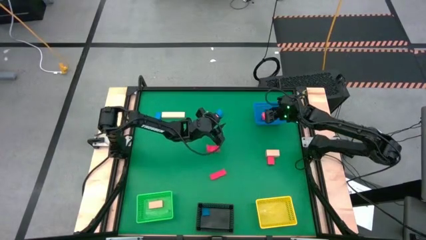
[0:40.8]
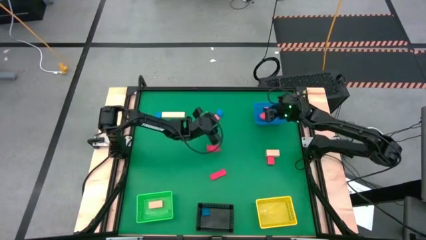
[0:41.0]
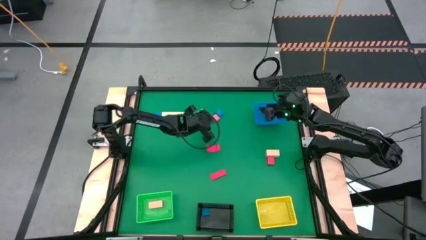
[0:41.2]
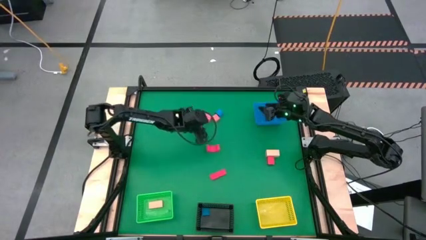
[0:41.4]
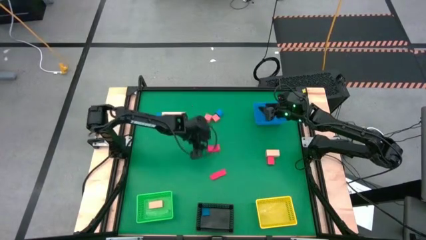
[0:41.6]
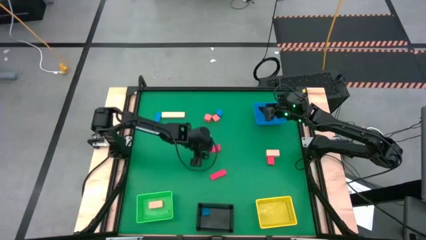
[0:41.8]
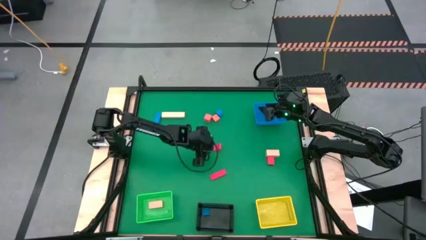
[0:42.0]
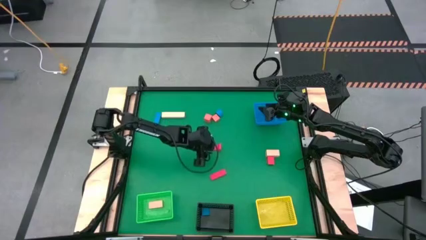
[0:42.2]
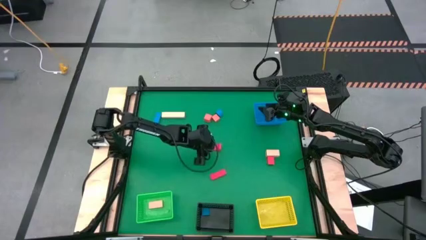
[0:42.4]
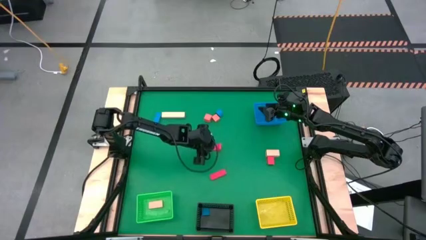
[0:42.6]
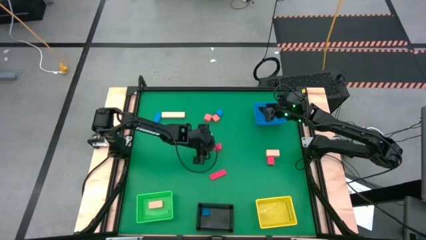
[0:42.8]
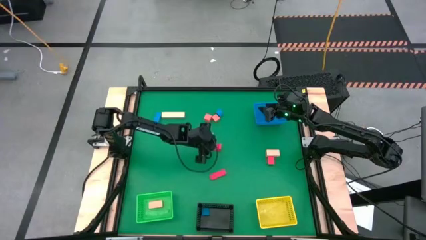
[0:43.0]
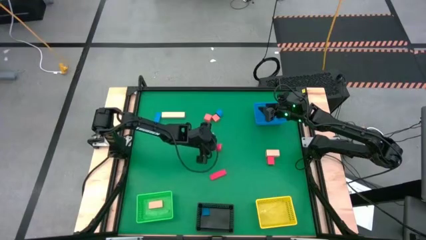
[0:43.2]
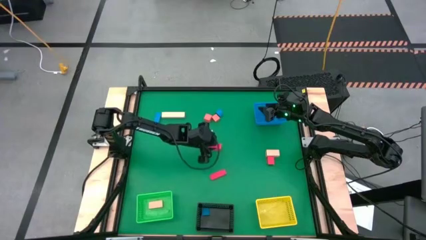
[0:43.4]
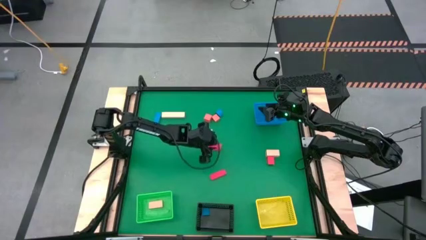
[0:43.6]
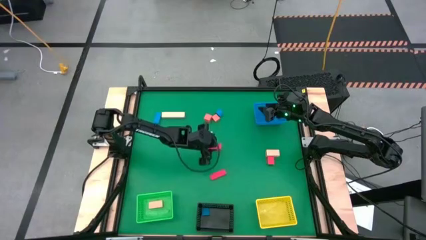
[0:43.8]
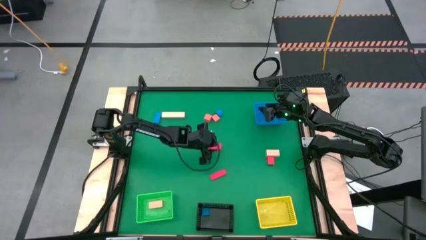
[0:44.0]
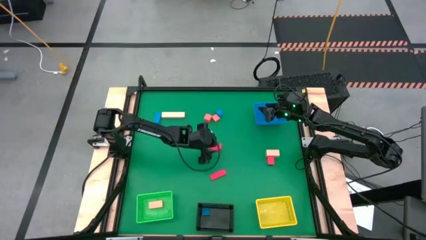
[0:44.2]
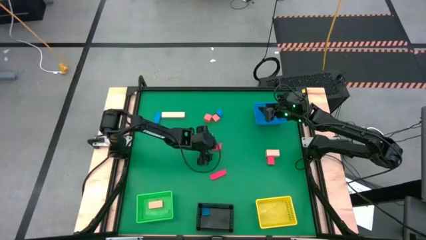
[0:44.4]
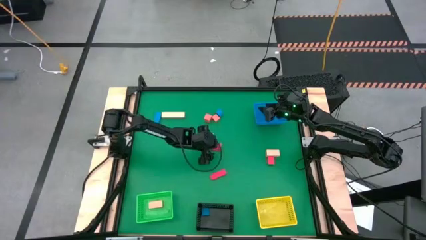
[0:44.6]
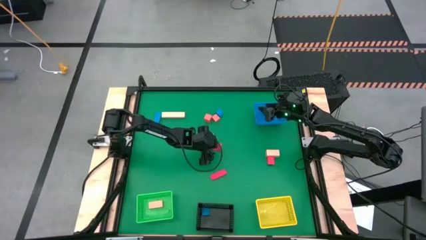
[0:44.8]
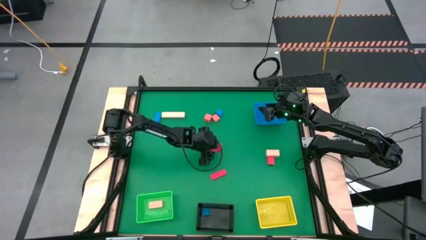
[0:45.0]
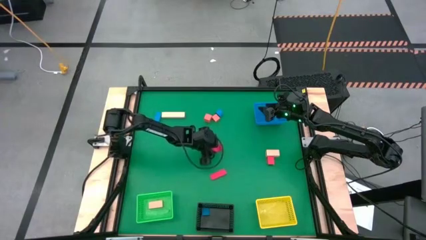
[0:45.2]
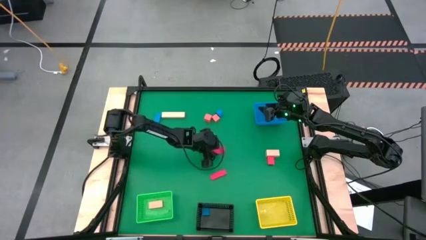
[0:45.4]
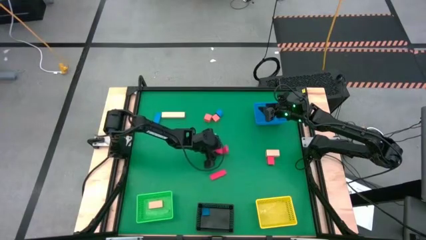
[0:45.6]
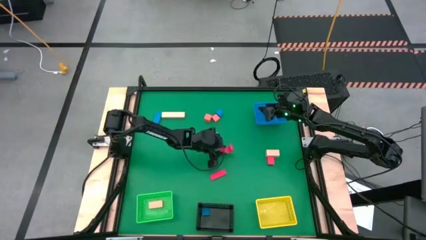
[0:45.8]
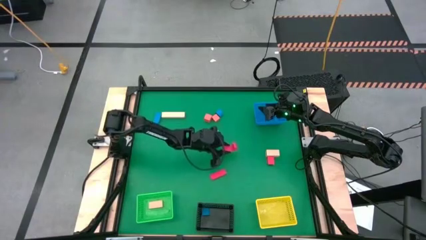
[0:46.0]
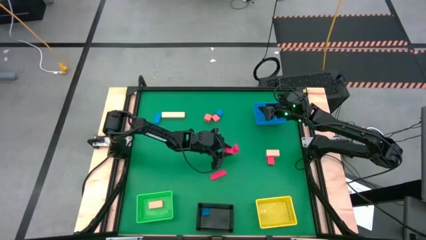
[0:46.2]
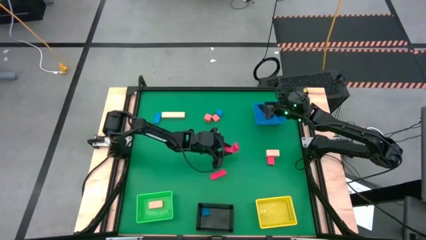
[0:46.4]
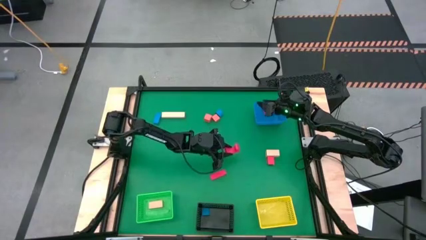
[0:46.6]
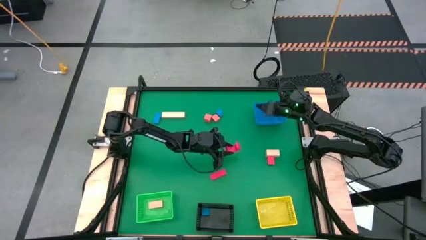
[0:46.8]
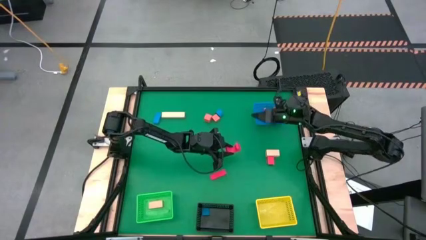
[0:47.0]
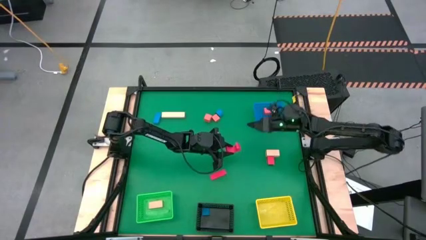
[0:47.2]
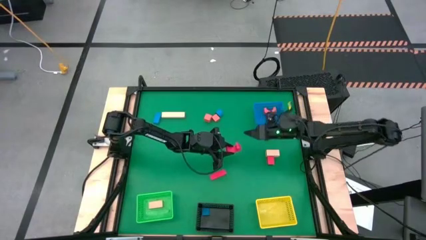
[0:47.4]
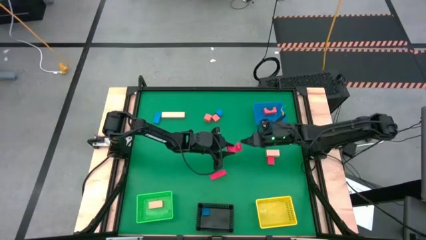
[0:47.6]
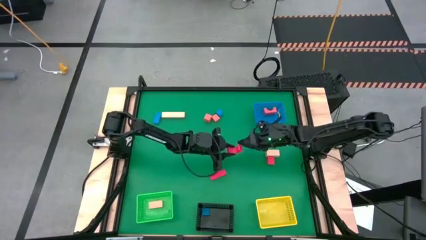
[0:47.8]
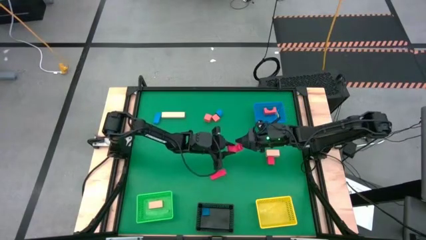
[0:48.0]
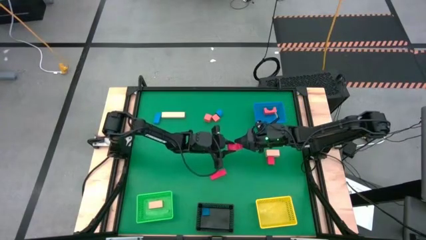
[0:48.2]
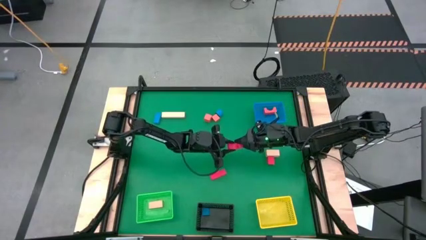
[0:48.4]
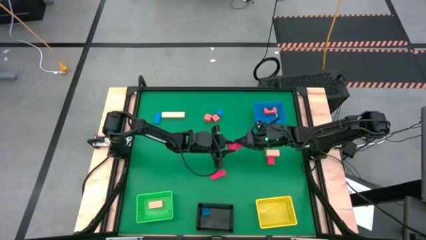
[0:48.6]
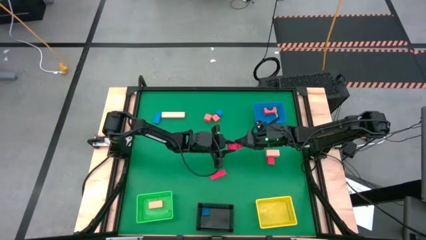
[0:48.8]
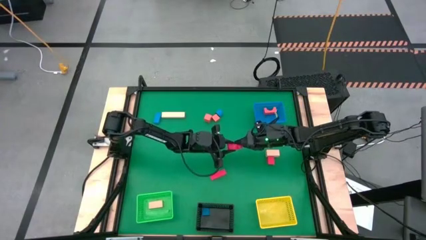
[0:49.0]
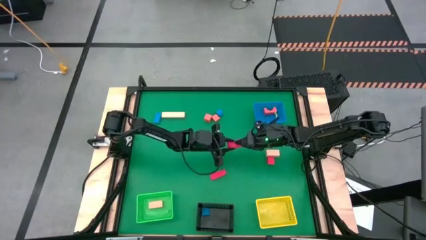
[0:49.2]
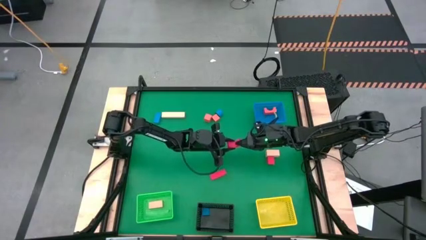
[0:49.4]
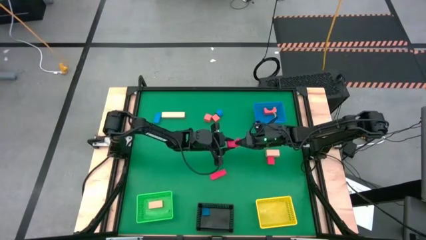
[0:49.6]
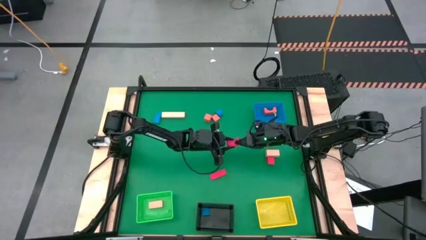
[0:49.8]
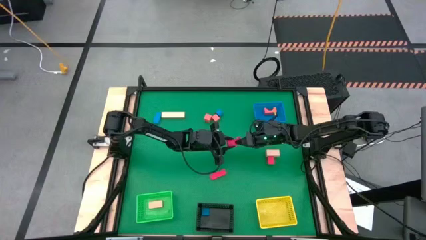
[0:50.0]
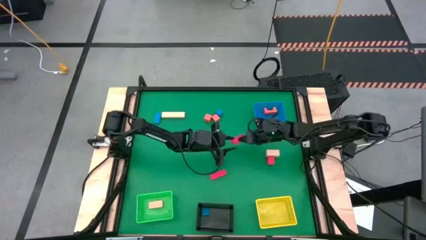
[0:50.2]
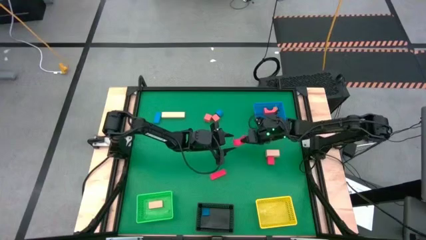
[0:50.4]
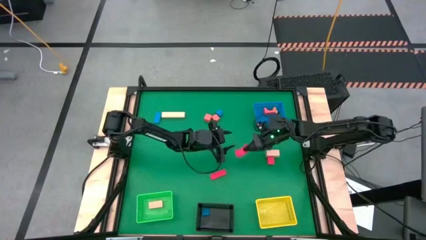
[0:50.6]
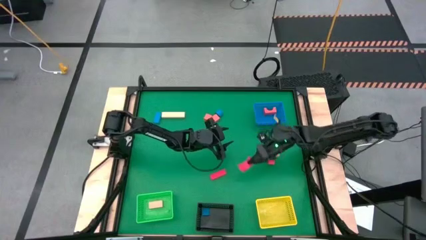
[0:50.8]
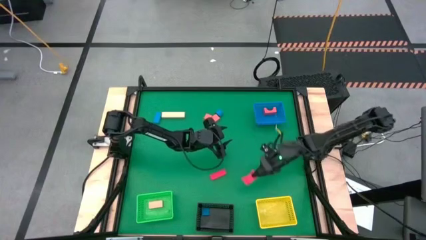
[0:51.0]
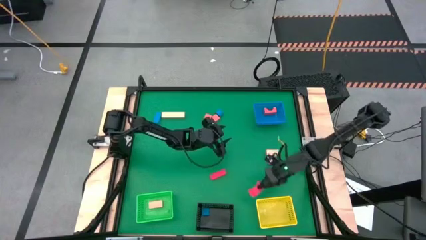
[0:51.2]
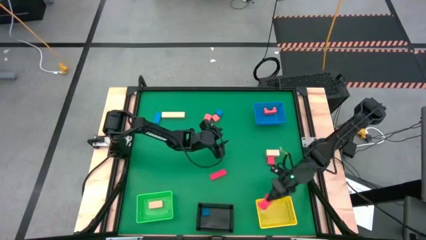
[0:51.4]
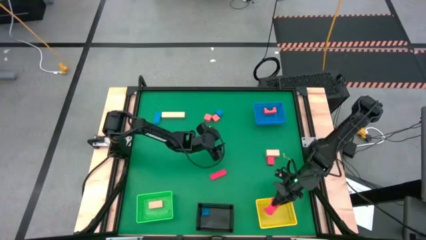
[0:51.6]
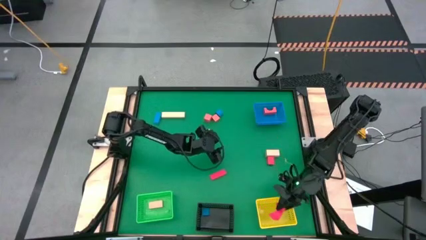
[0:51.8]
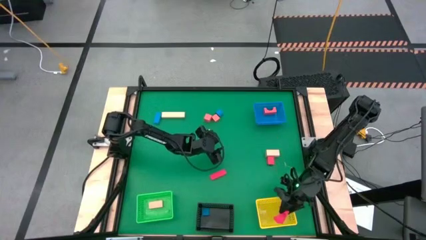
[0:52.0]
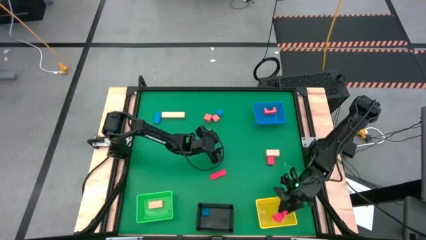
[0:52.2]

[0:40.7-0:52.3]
Task: Sort & place blocks by color
Put the red block into the yellow bin

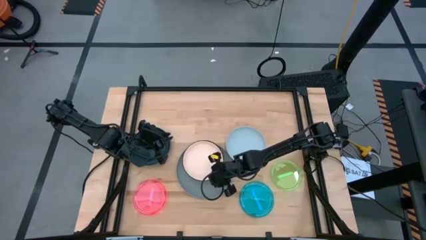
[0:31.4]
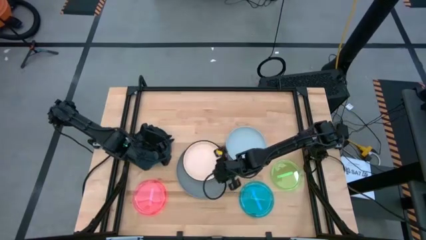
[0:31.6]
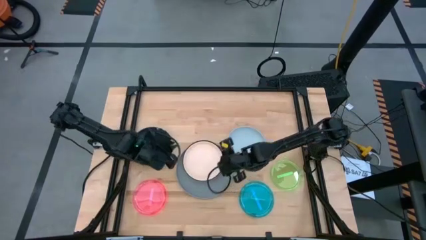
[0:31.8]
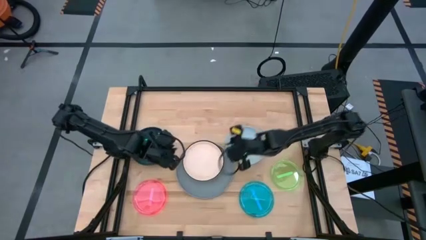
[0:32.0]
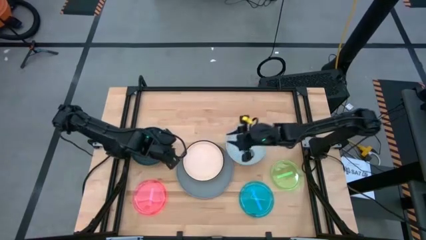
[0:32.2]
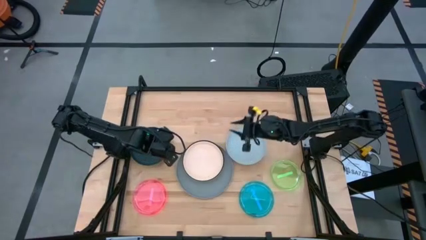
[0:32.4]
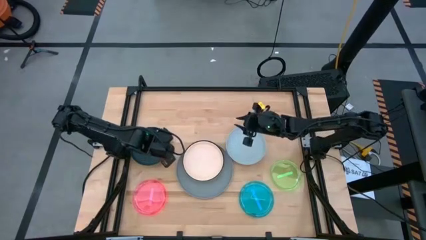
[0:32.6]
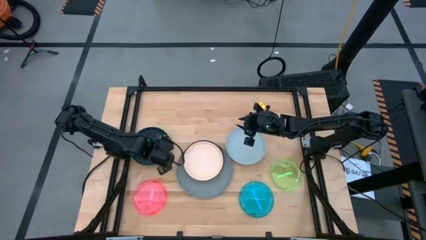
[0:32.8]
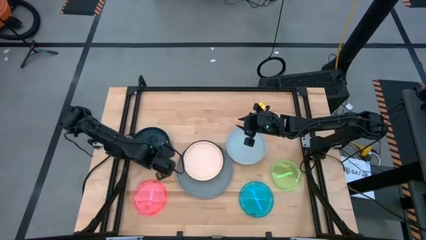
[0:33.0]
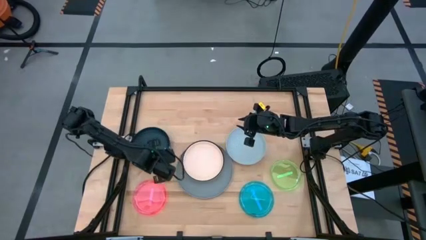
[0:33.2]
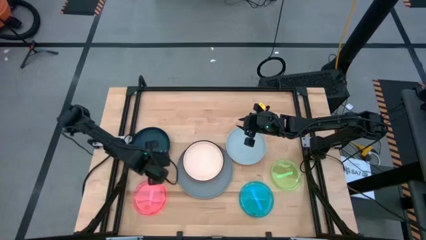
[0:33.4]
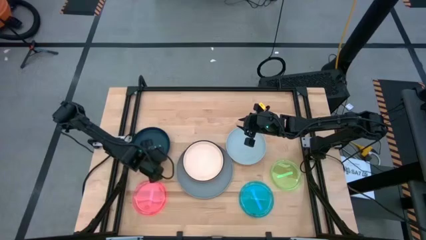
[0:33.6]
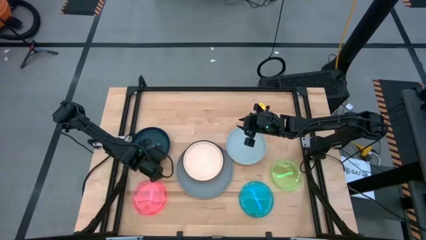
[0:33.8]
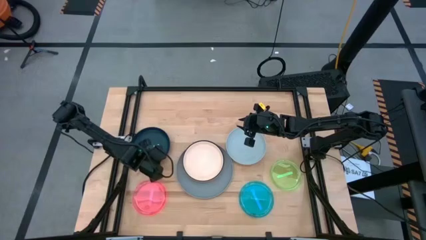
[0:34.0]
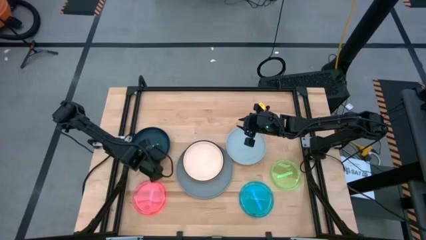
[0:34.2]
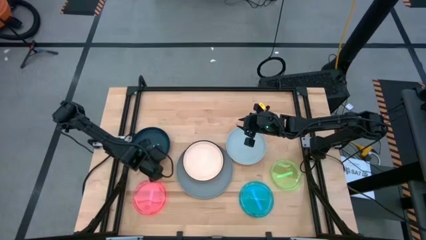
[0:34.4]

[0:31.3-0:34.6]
Task: Stack plastic plates
Stack the dark blue plate on top of the orange plate

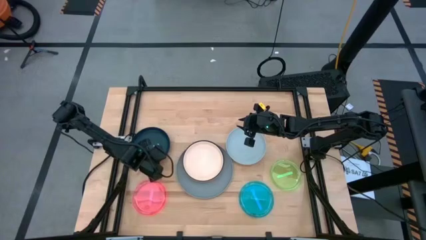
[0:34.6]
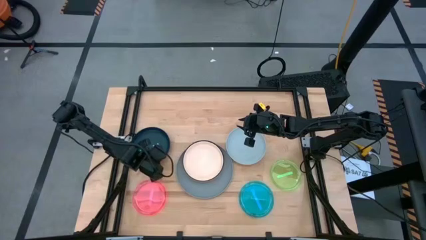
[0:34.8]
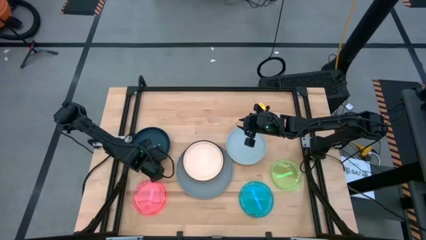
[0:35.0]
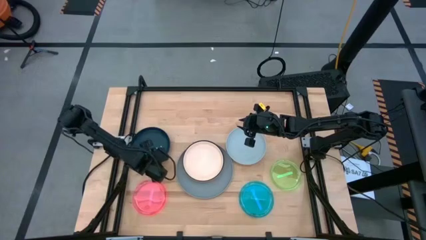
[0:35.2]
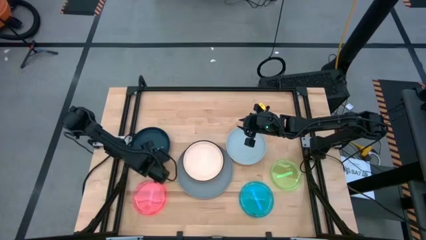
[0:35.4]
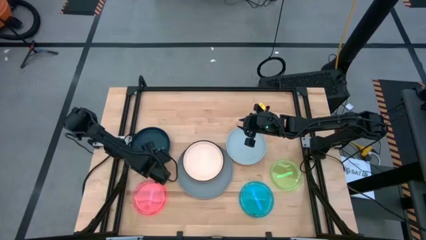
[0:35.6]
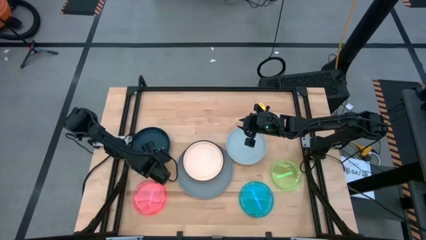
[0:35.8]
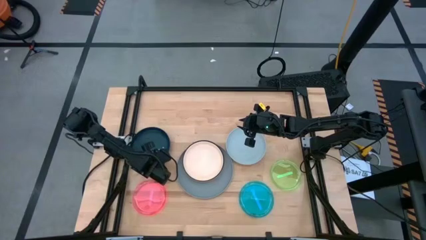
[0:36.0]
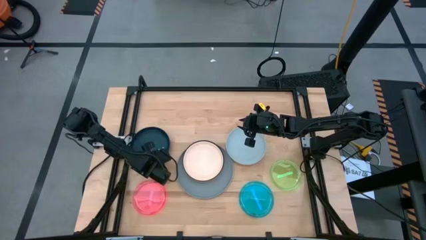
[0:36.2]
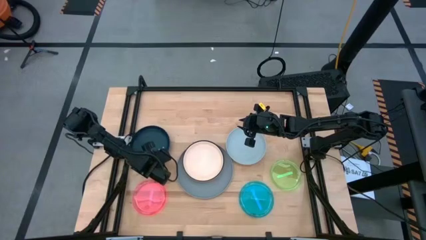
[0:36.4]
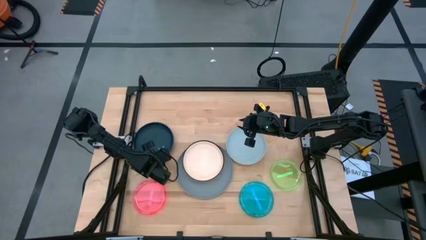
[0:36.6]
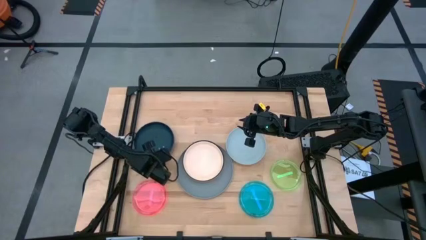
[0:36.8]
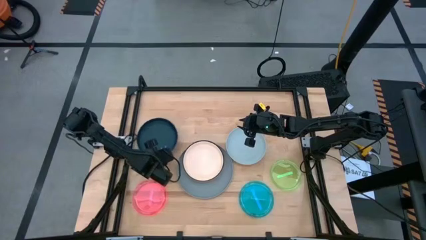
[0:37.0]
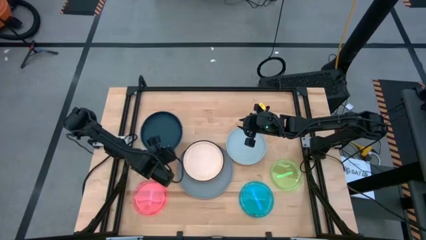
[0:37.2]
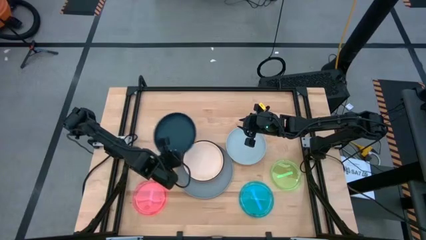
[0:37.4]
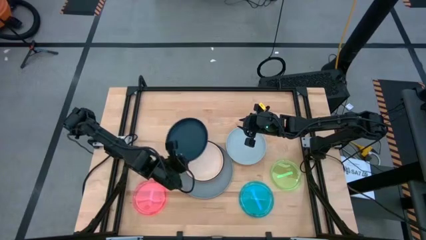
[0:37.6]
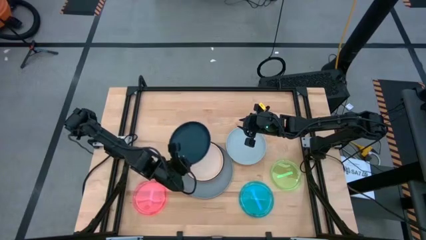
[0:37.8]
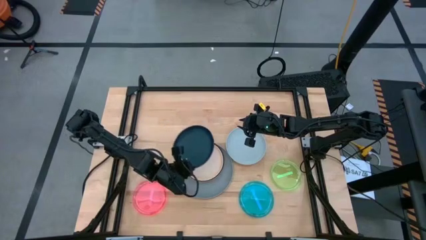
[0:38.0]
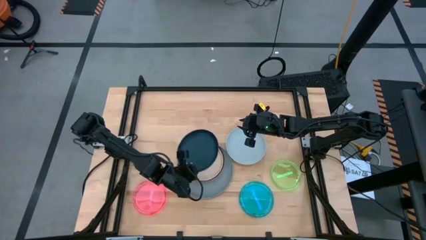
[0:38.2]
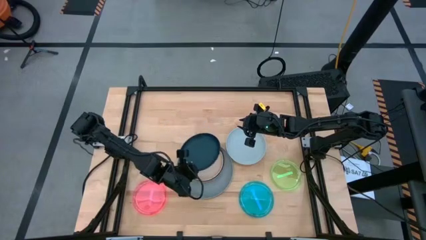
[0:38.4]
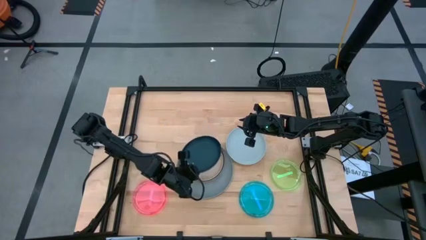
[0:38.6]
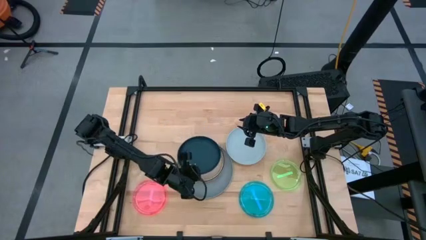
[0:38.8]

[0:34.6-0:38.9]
Stack the dark blue plate on top of the orange plate
